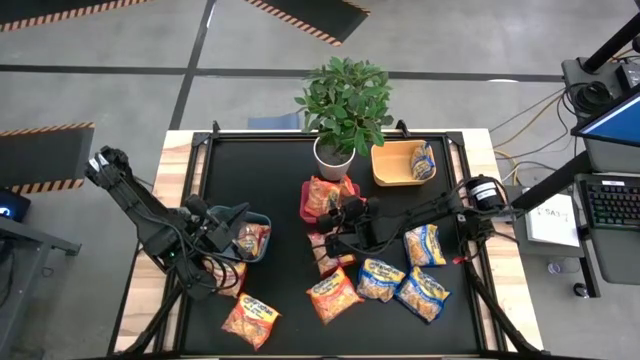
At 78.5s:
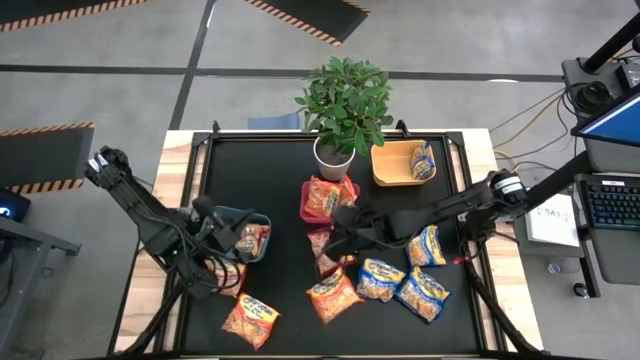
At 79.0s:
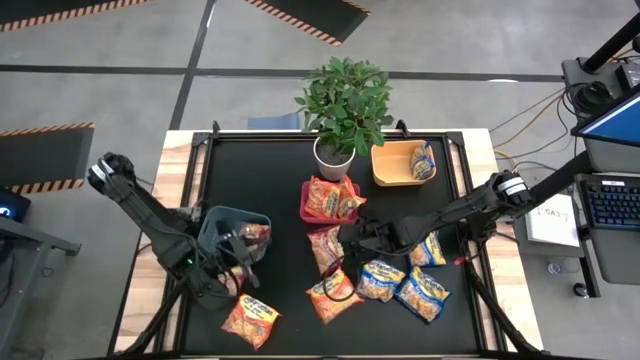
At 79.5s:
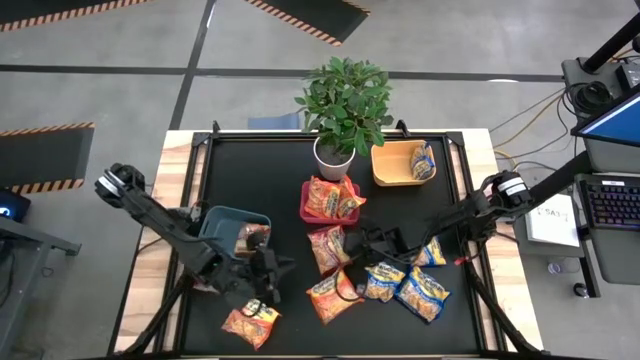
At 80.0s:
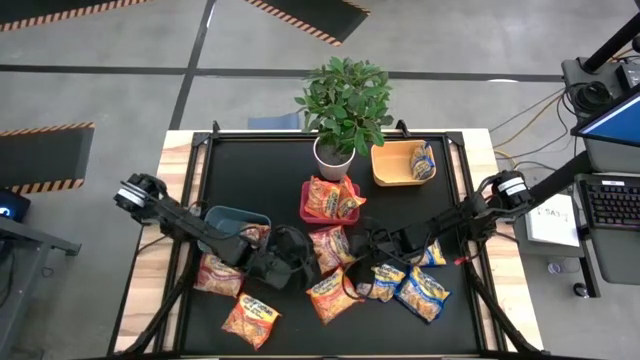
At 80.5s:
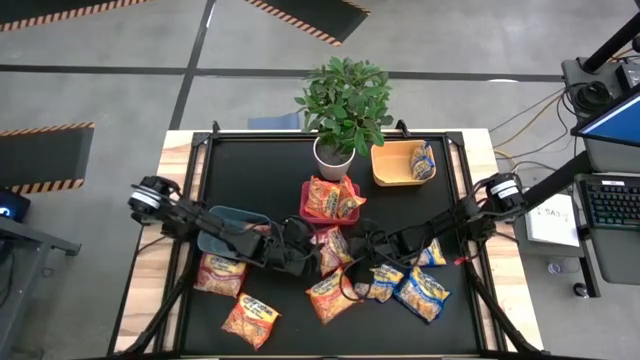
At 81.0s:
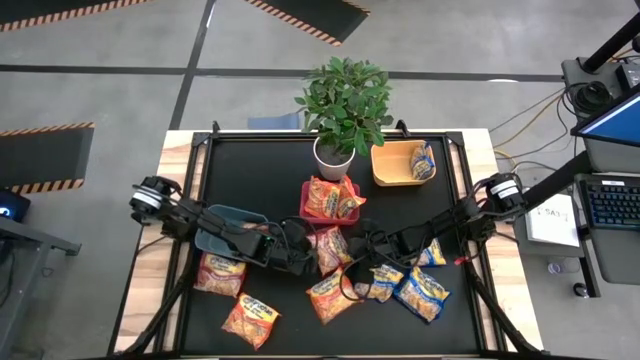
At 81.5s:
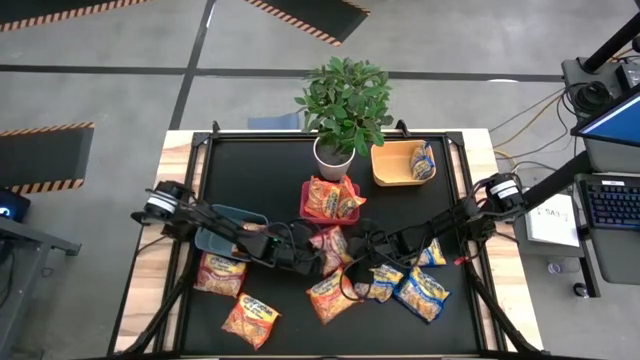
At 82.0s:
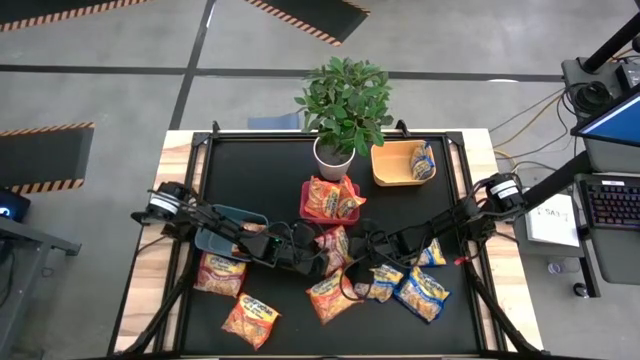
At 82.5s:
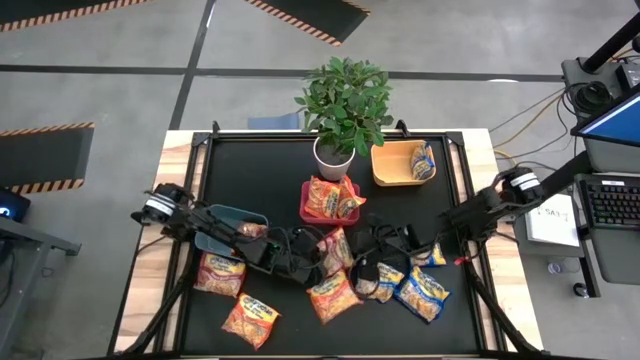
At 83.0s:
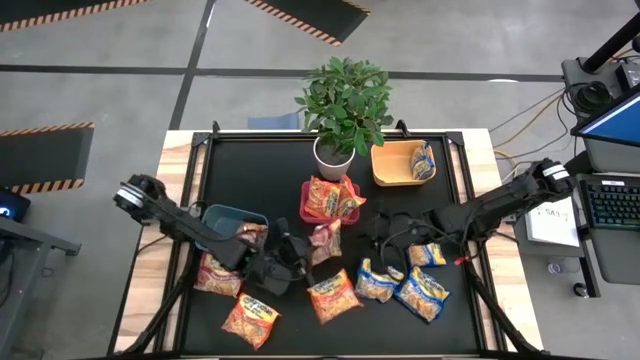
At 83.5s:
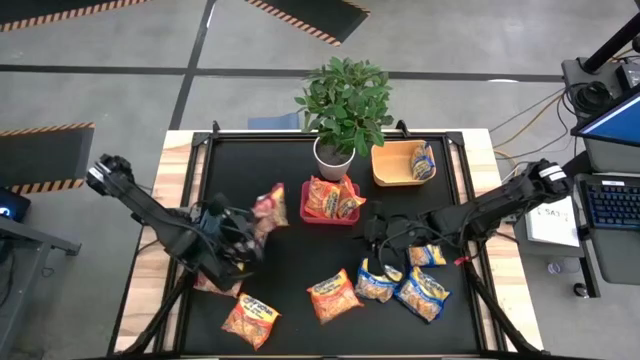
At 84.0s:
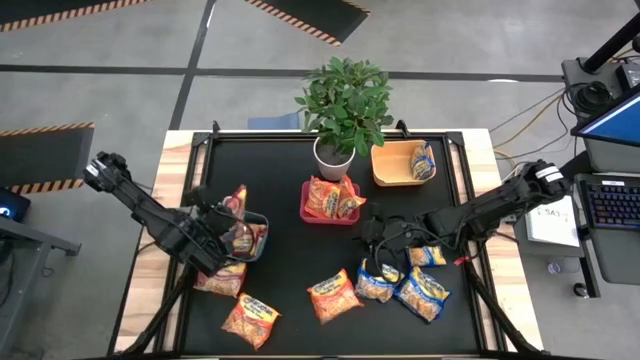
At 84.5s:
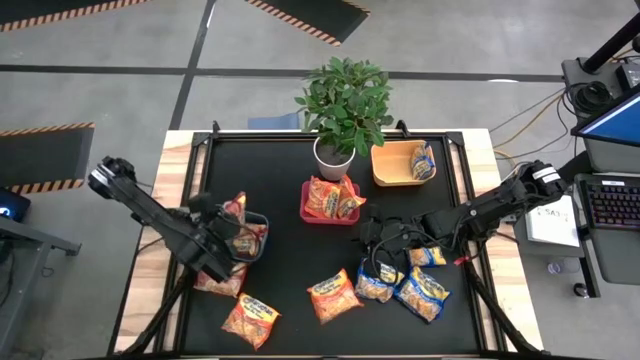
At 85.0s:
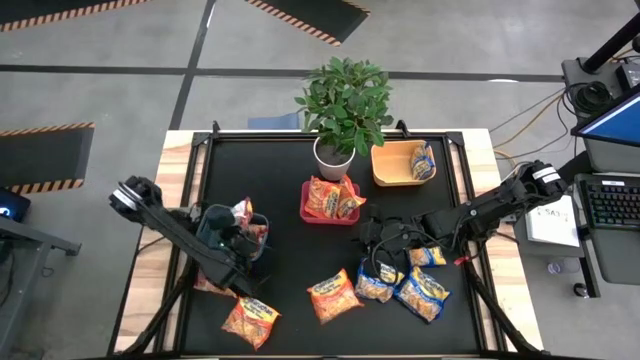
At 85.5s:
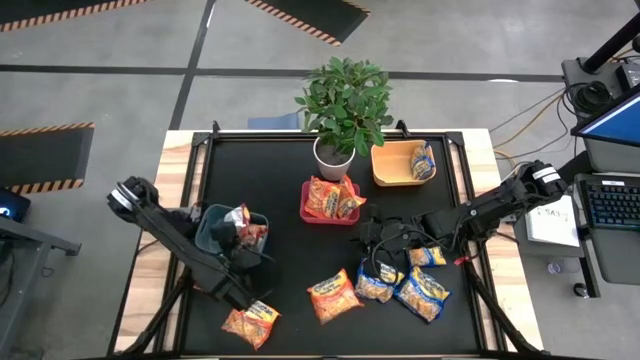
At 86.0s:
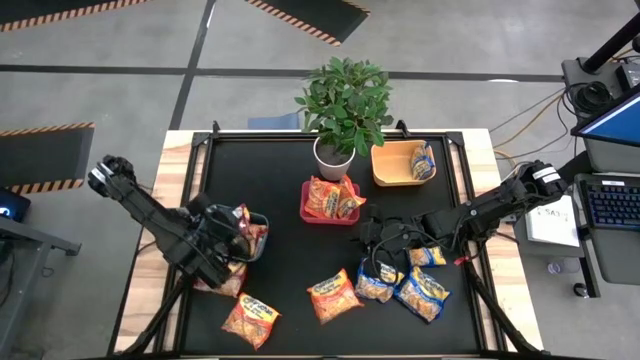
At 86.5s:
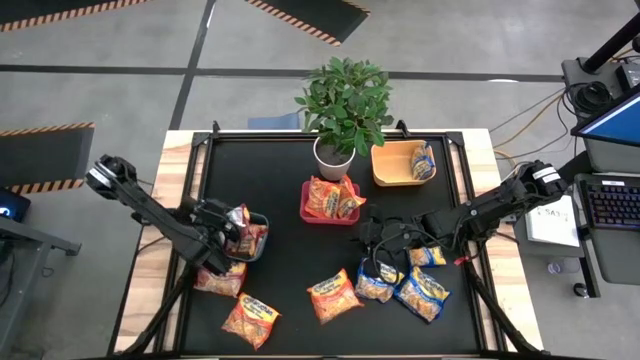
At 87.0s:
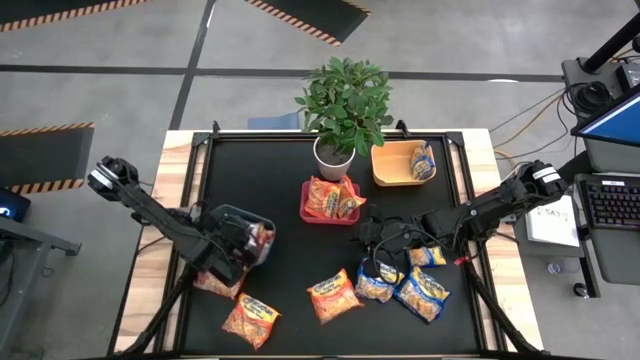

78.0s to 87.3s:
Task: Sort Maruchan noodles
Put the right red noodle pack into the green bin

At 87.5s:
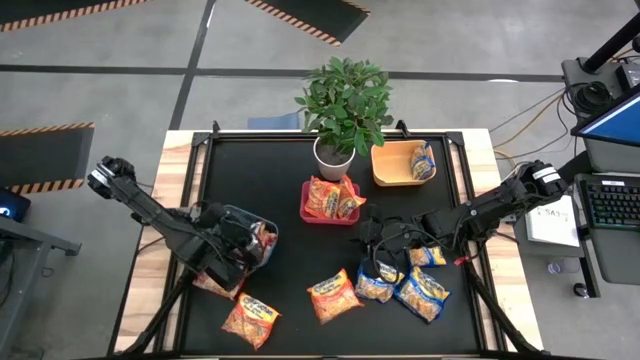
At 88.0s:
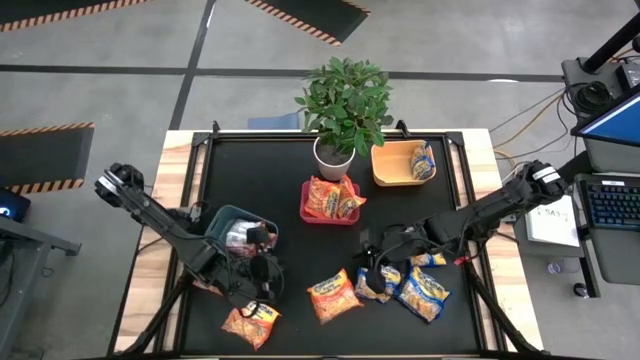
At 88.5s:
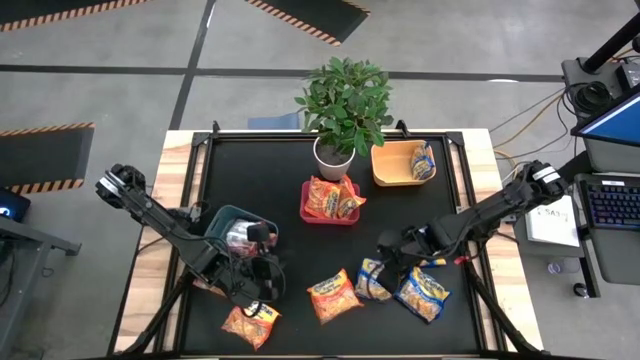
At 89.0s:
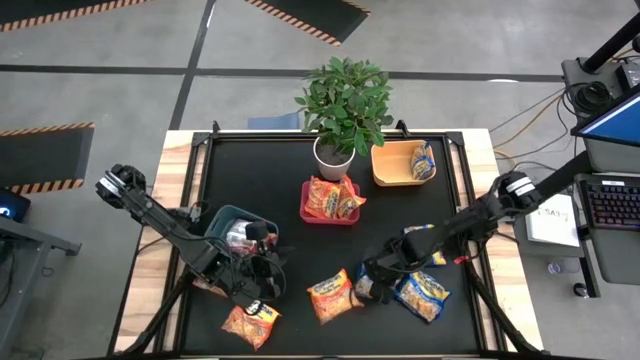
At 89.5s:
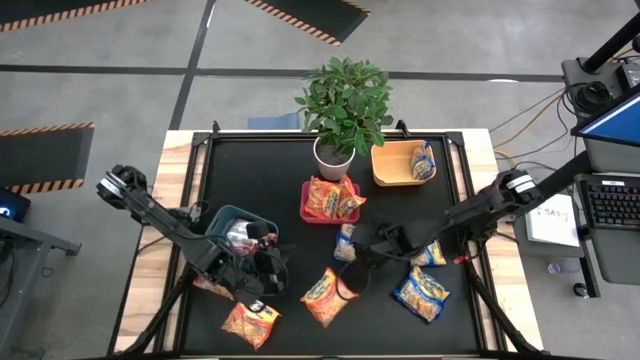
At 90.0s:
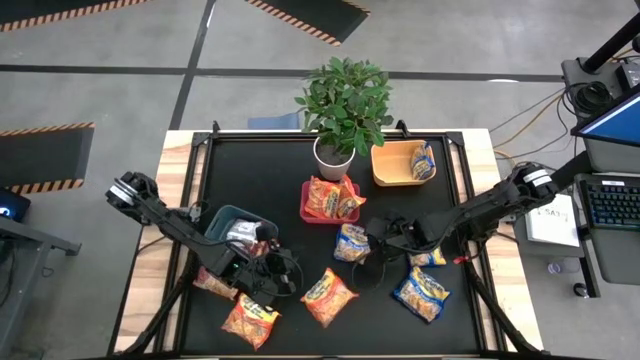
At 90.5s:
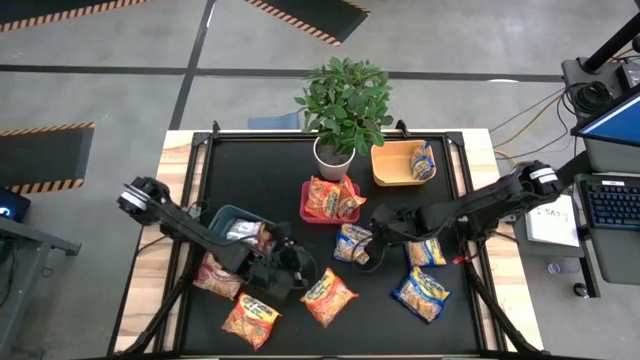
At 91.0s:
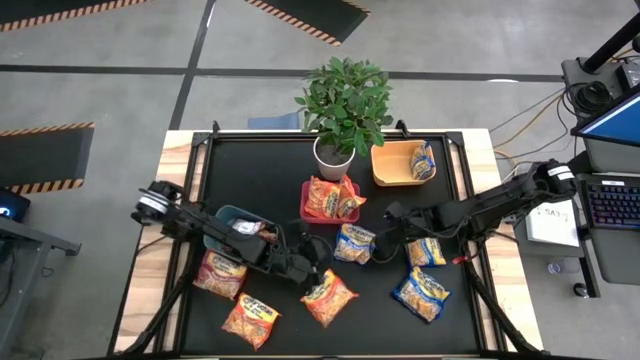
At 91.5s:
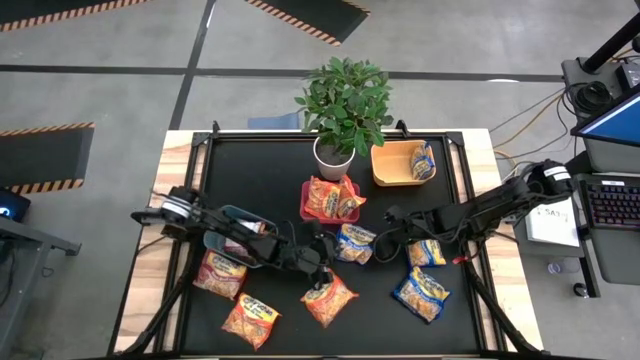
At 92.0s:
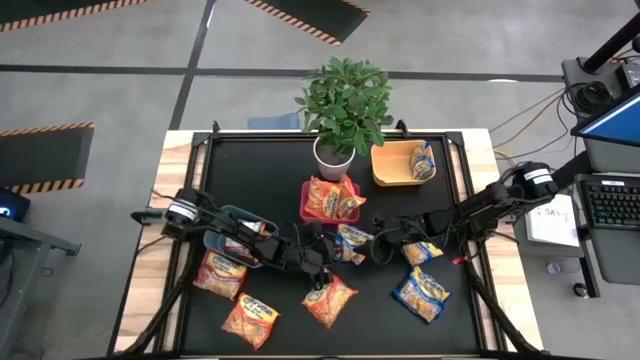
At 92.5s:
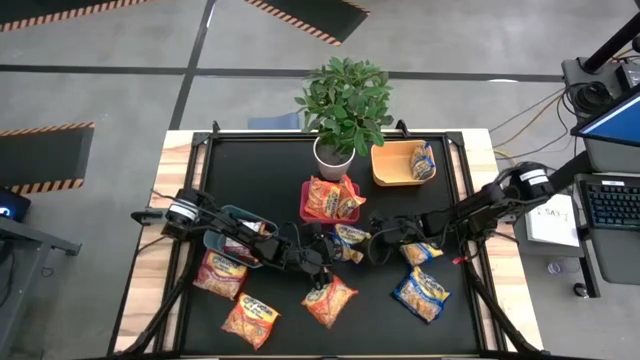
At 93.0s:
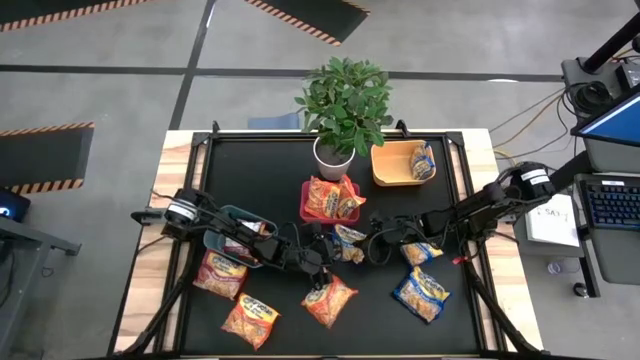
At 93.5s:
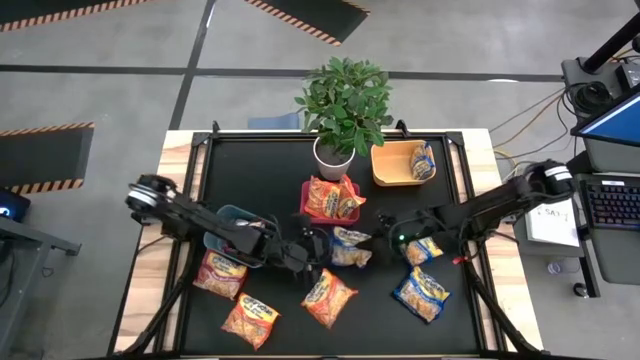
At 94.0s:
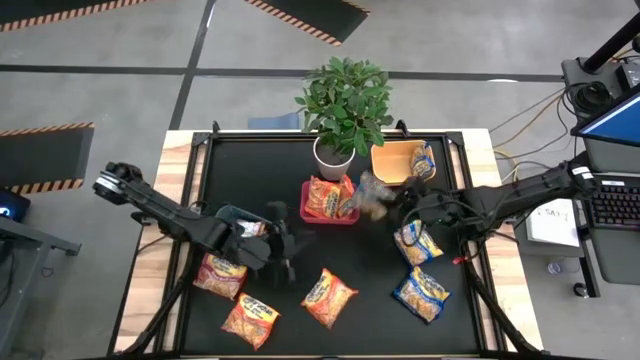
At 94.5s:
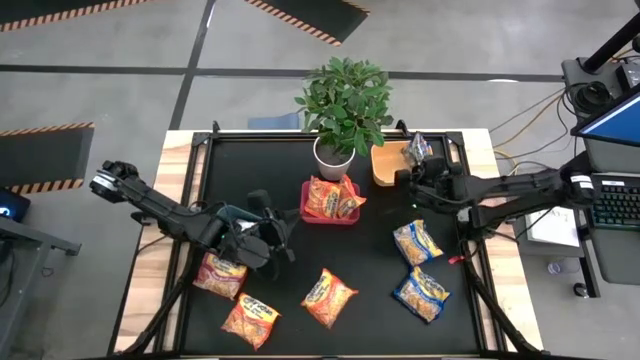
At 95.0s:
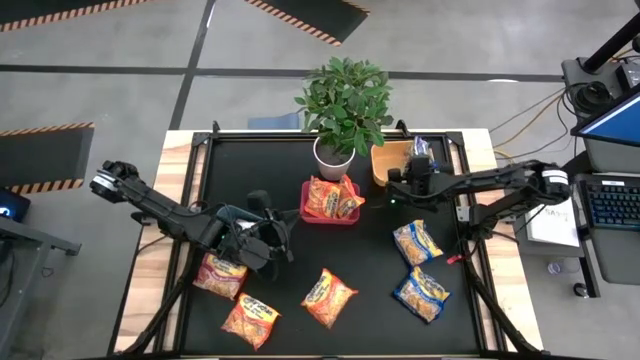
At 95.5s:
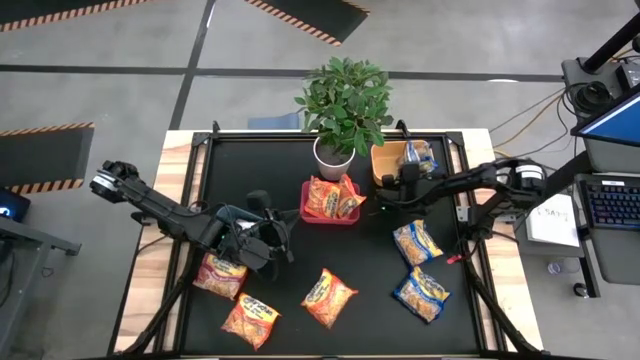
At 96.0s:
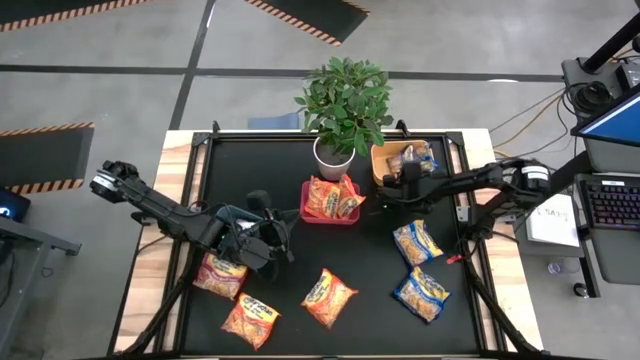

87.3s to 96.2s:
Put the top left blue noodle pack into the yellow bin

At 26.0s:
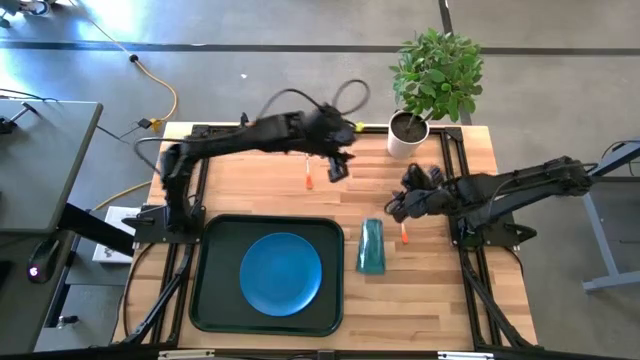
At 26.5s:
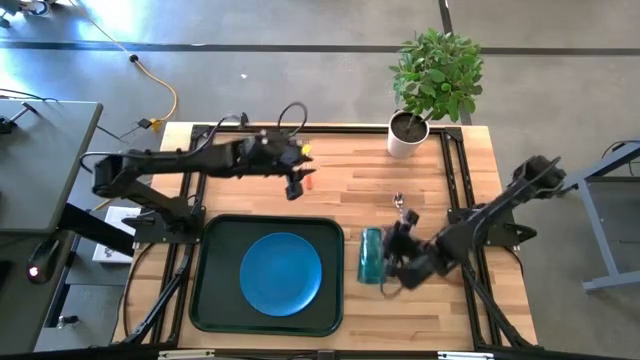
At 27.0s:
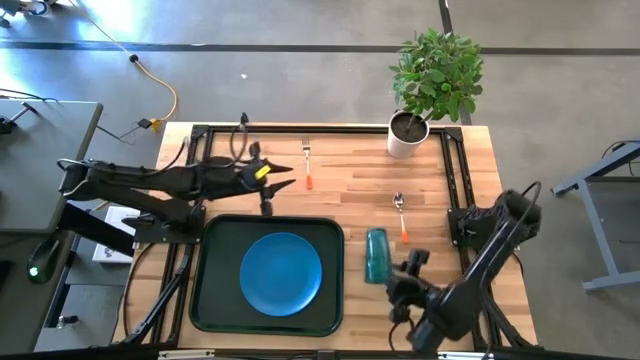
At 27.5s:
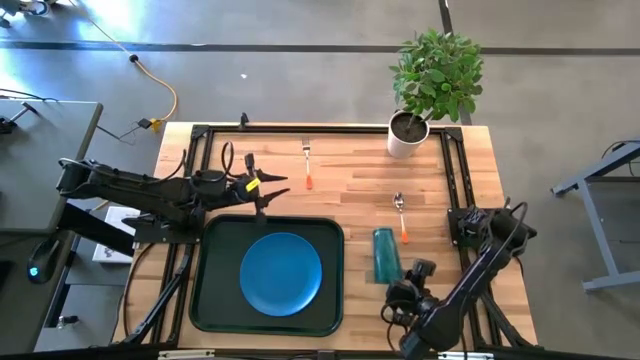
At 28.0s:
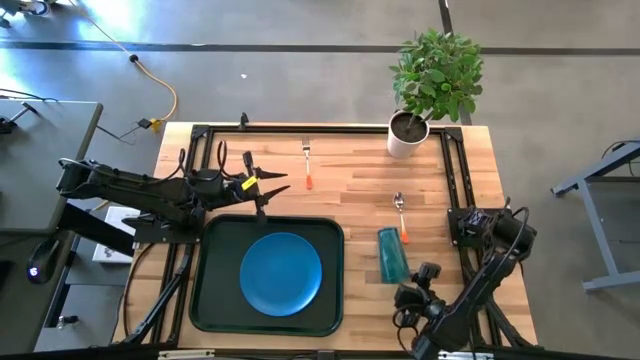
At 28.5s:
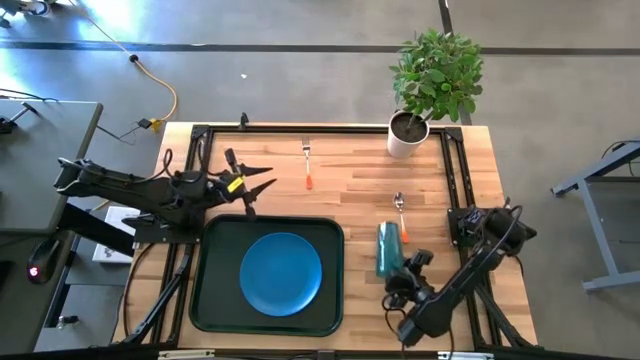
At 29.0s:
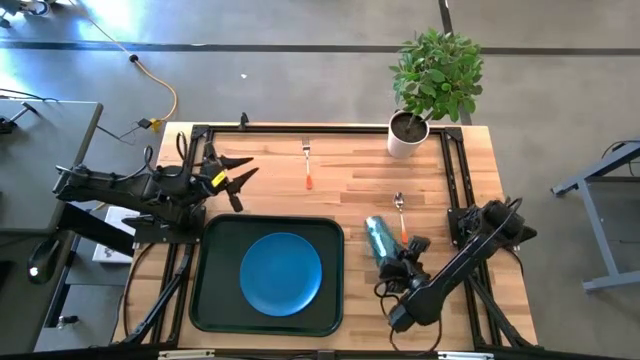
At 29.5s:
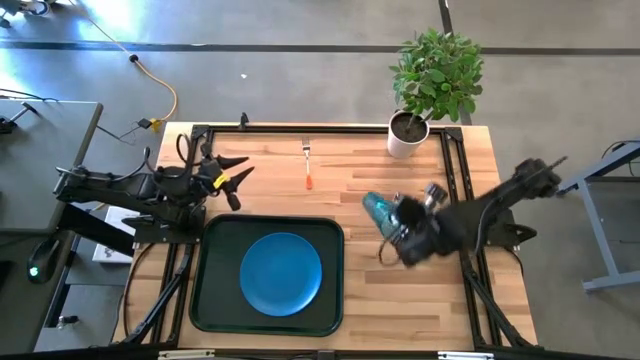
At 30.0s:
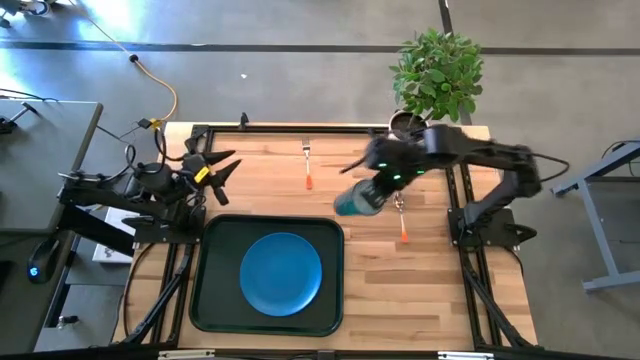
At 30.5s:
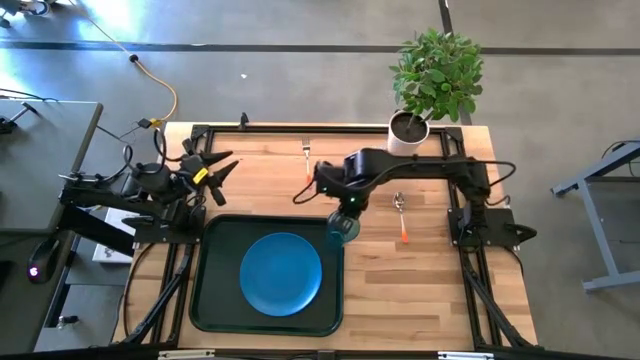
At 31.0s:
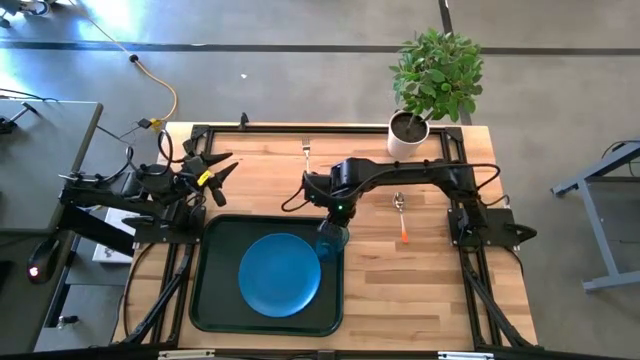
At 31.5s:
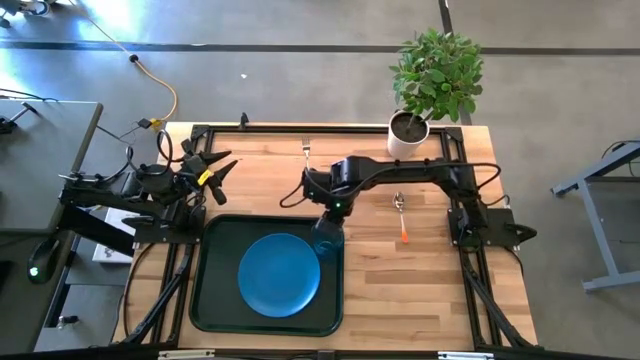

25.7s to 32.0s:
Task: Pick and place plate/cup/fork/spoon on tray
Put the blue cup on the black tray to the top right of the blue plate
